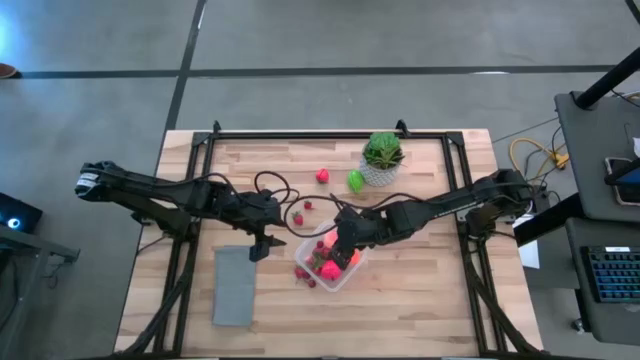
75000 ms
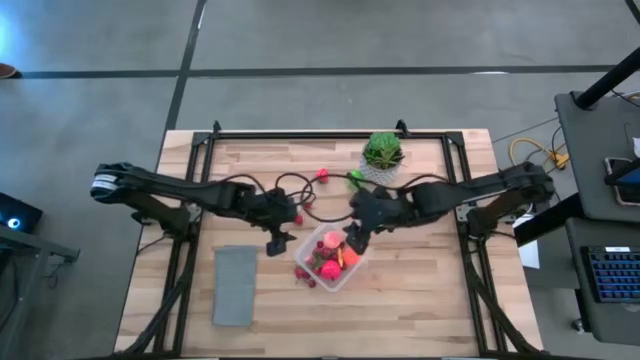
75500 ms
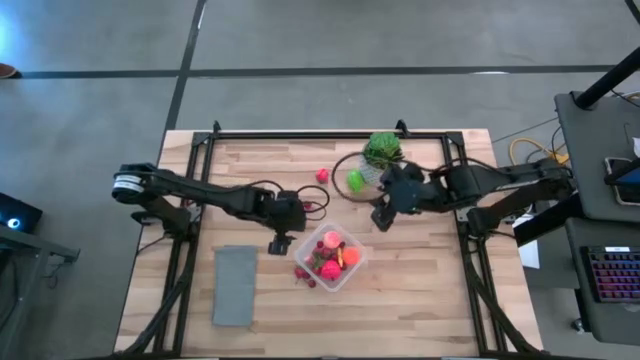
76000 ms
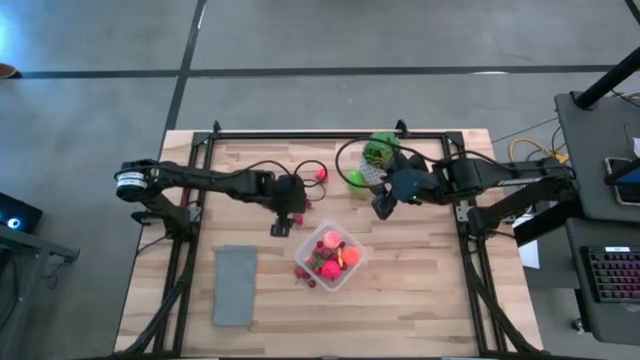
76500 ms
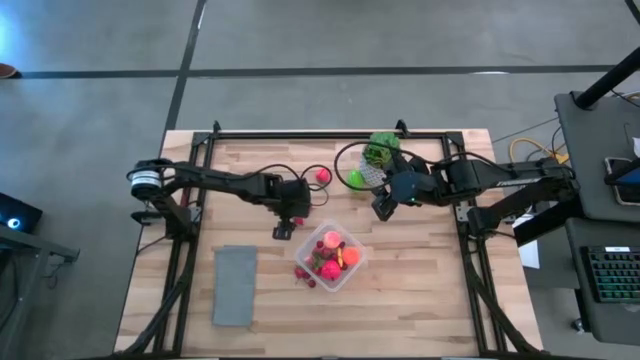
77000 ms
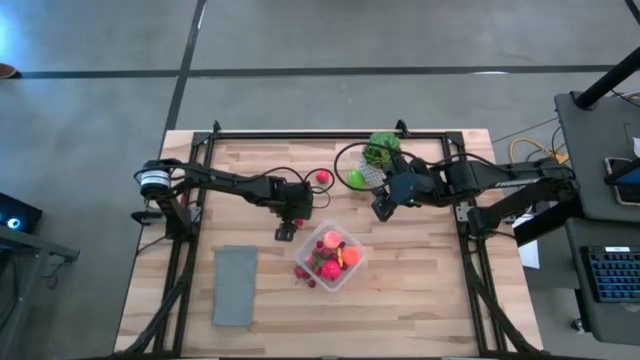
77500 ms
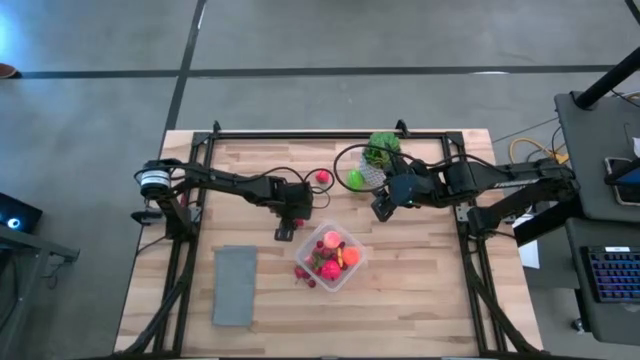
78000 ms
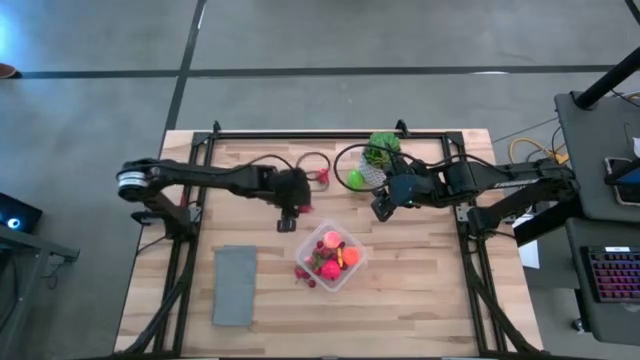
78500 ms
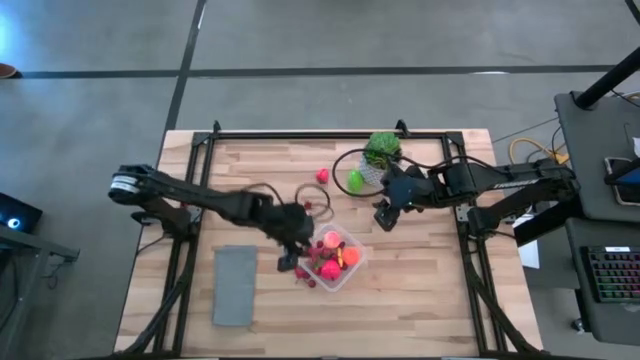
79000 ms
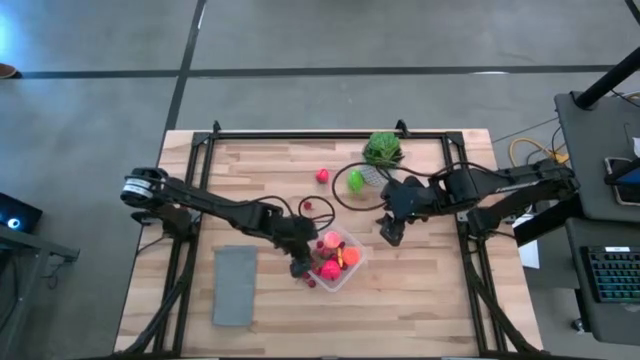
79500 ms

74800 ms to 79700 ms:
Task: Pick and placing Produce into tupperware
Put the red strawberry into the transparent bin

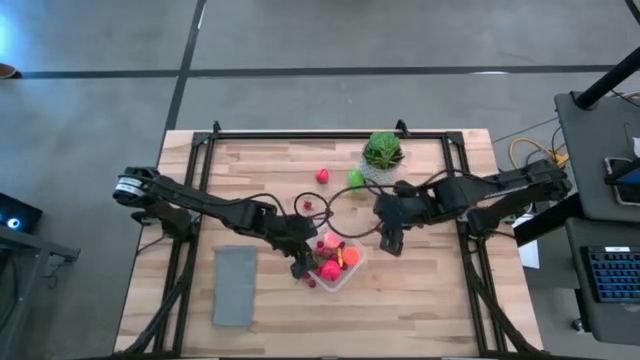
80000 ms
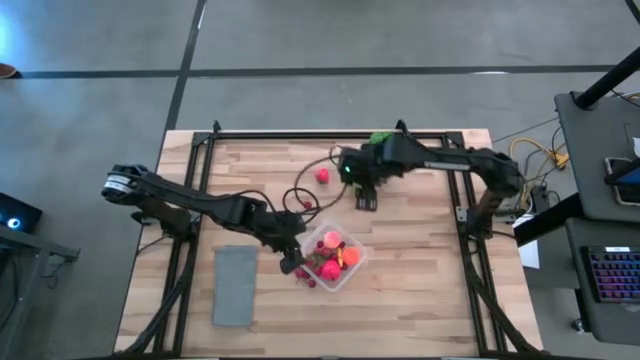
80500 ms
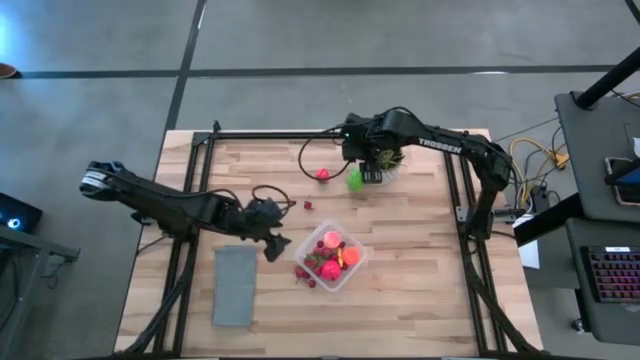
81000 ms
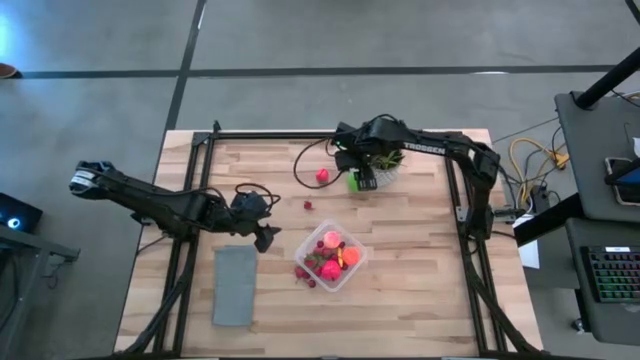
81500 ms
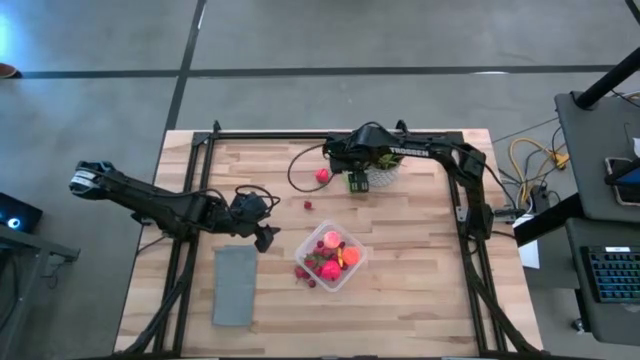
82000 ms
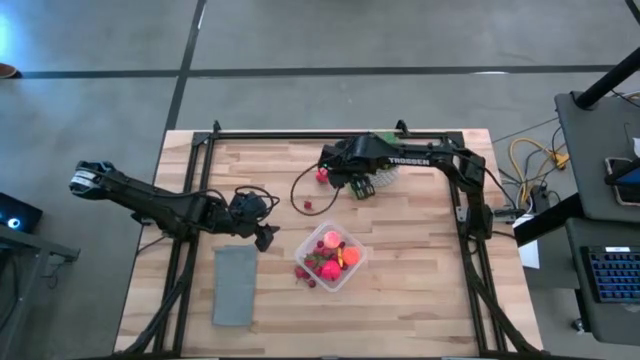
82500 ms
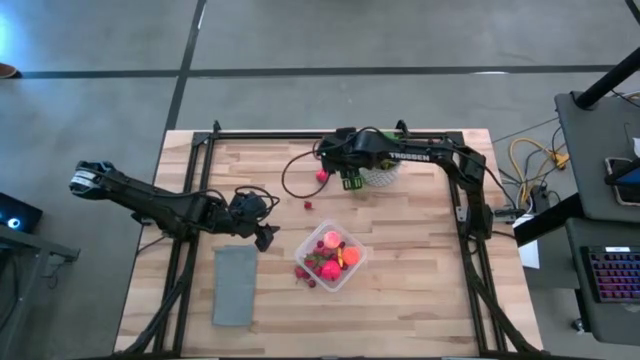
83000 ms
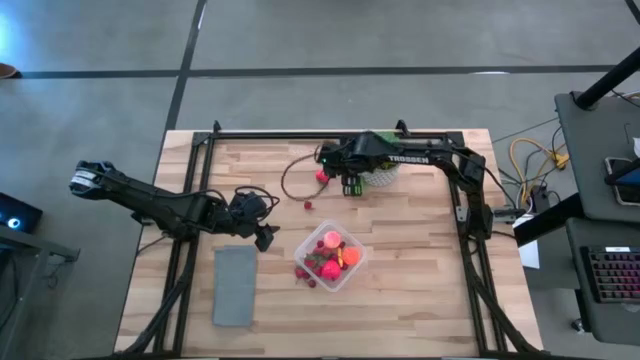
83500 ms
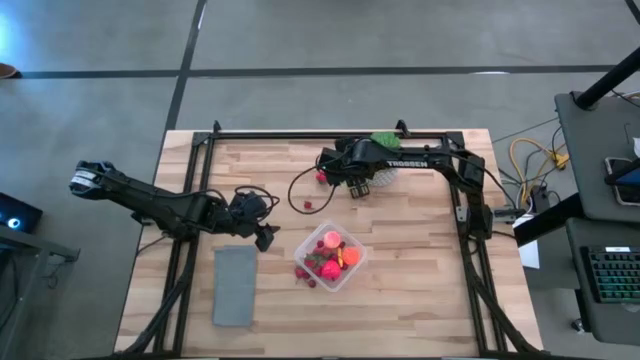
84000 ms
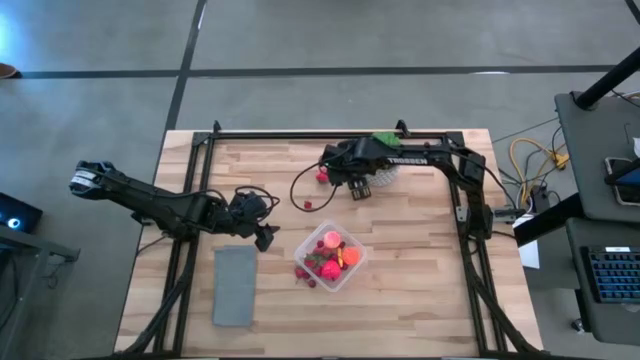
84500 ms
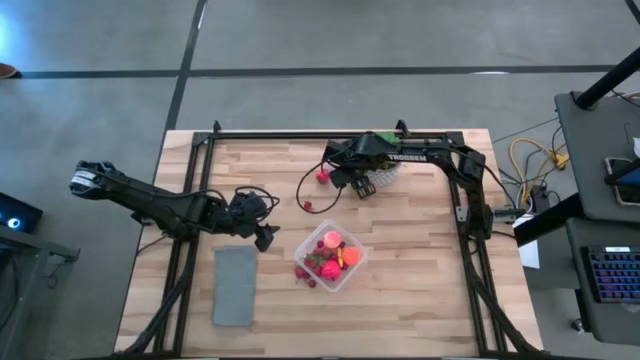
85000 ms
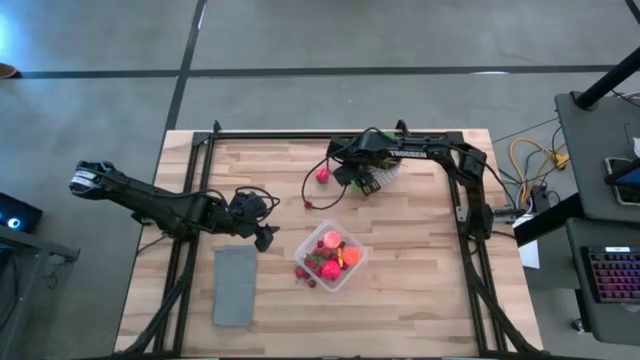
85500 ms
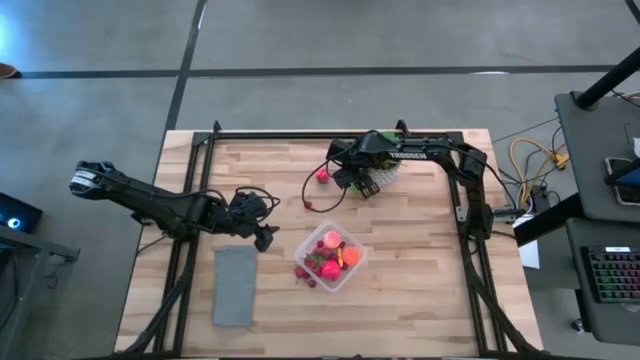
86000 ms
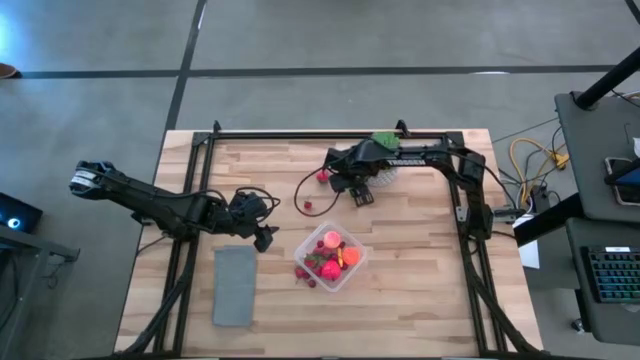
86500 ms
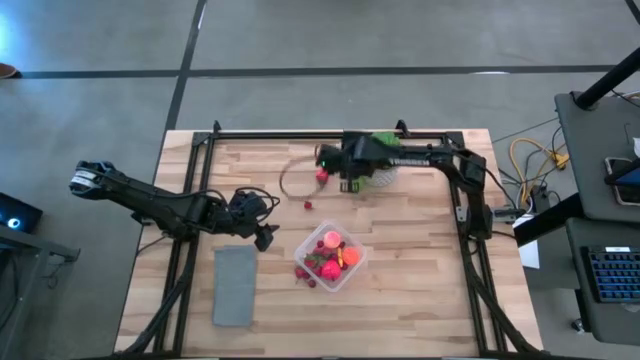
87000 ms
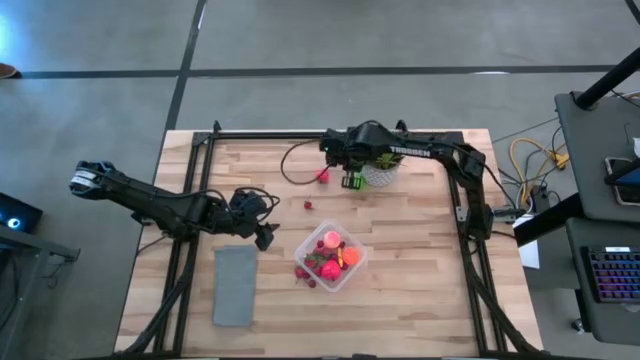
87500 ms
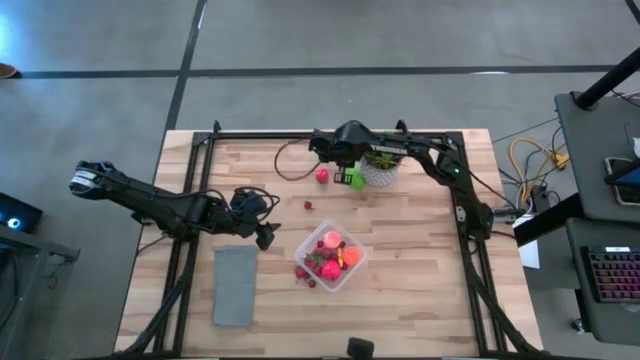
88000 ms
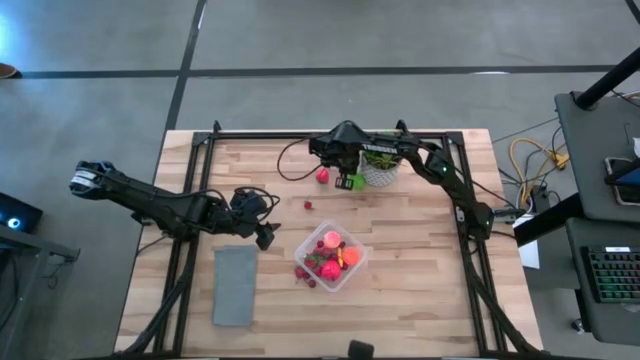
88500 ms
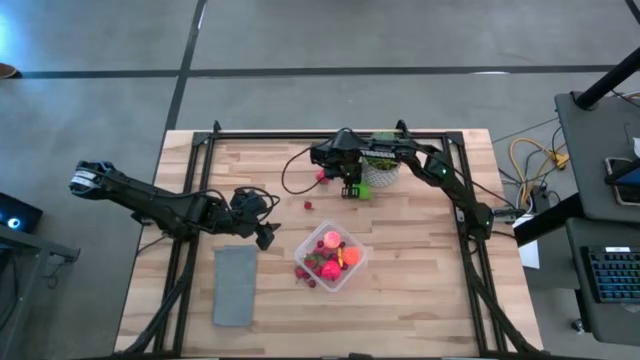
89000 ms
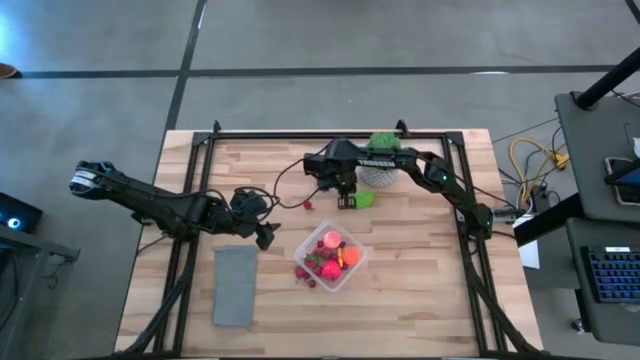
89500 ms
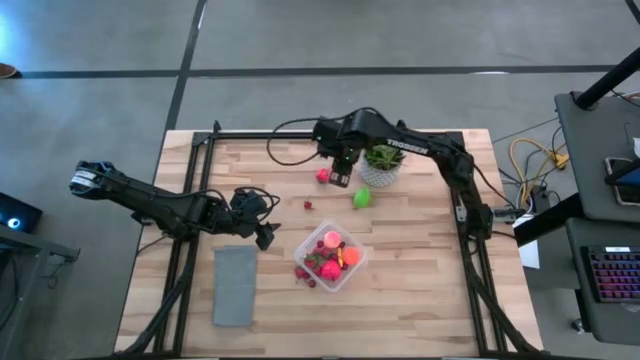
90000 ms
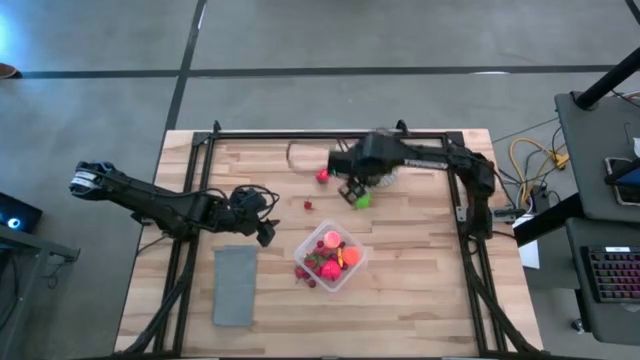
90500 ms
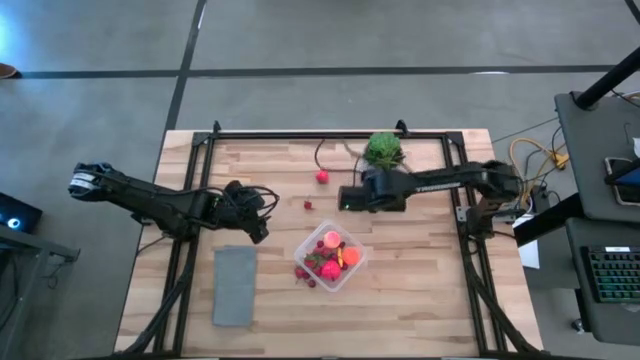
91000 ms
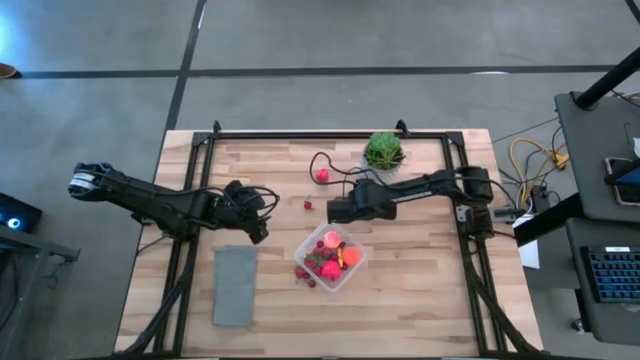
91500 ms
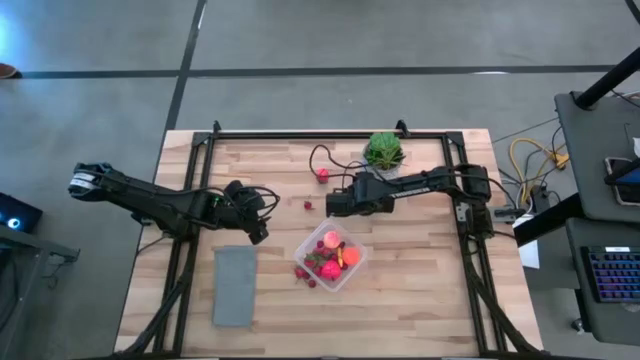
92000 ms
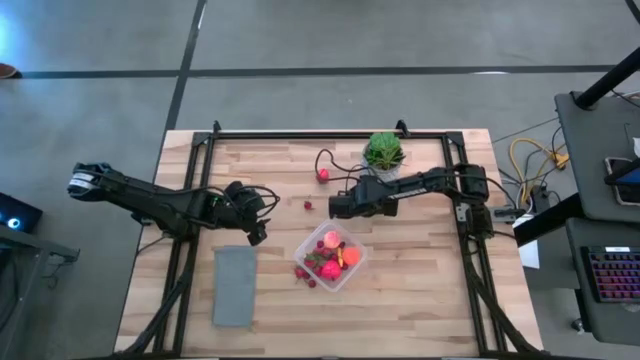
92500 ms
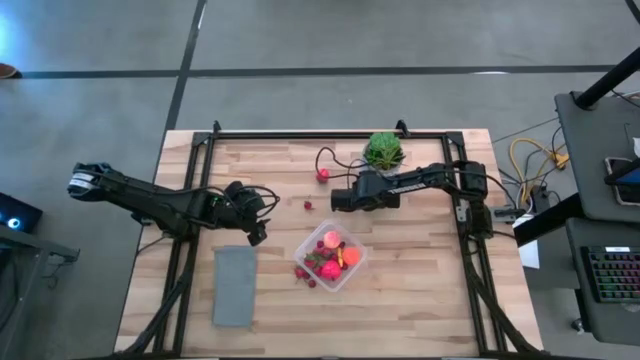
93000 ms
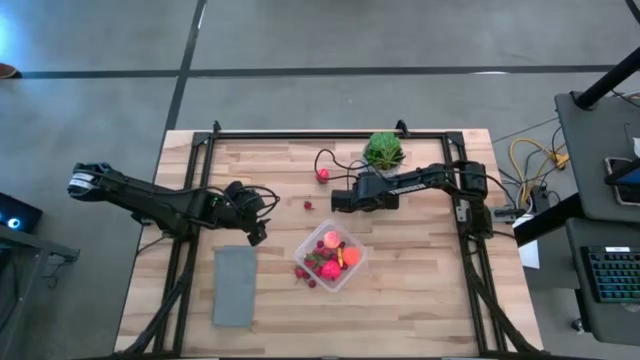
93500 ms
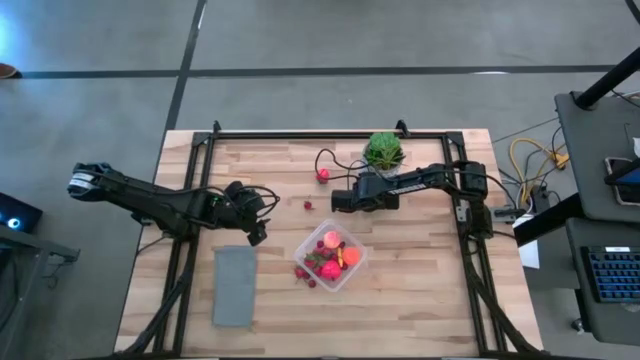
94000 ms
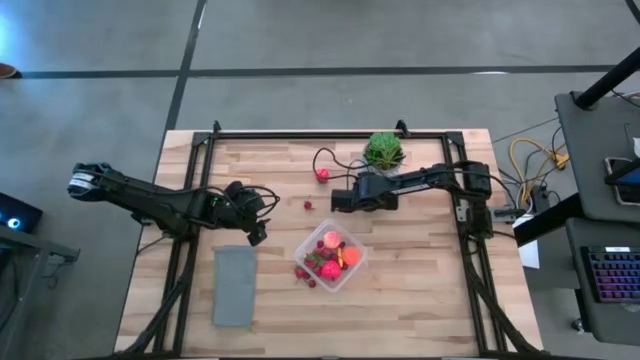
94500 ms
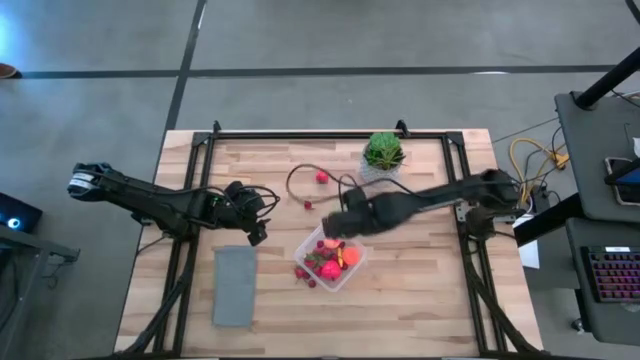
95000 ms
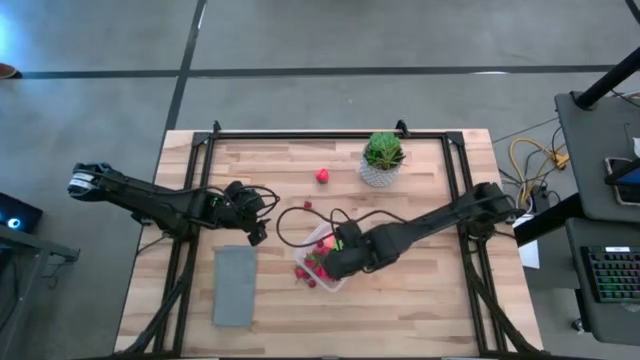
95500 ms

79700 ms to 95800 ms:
Put the green lime into the transparent bin

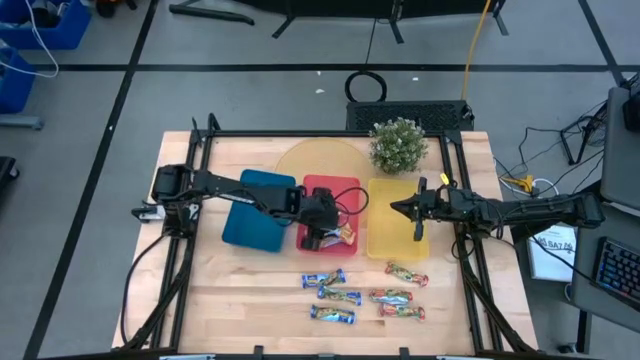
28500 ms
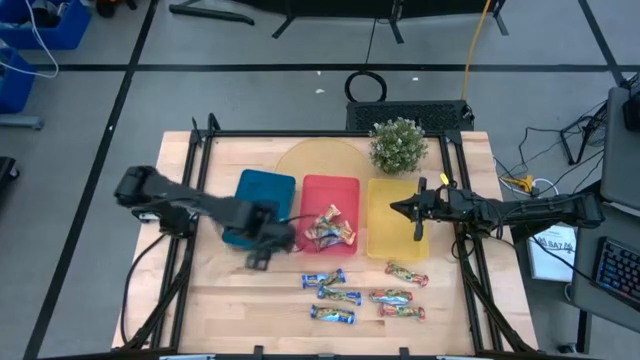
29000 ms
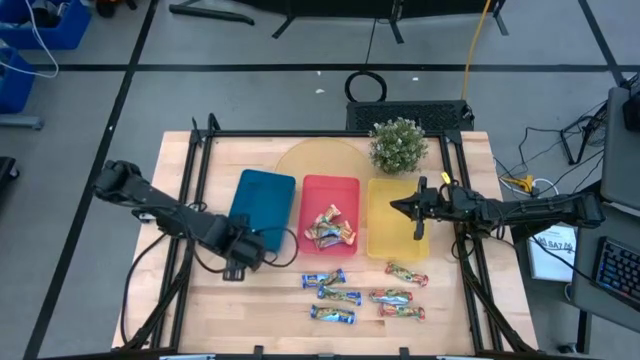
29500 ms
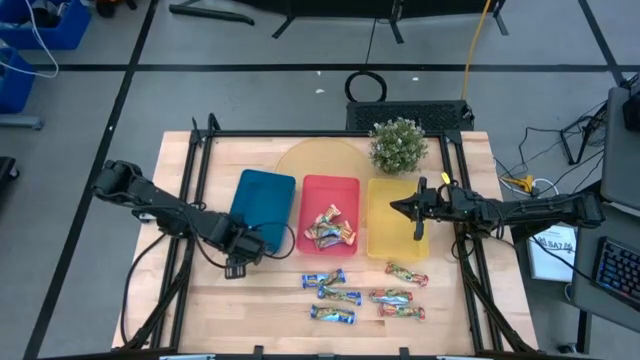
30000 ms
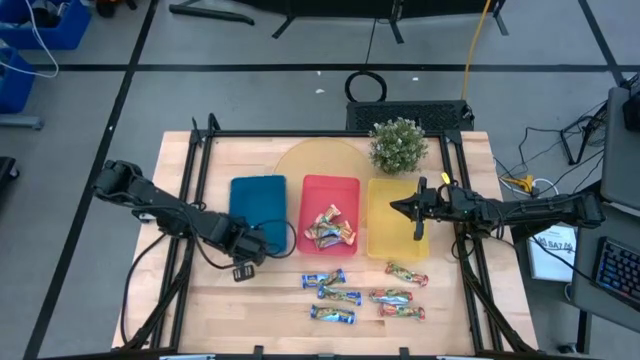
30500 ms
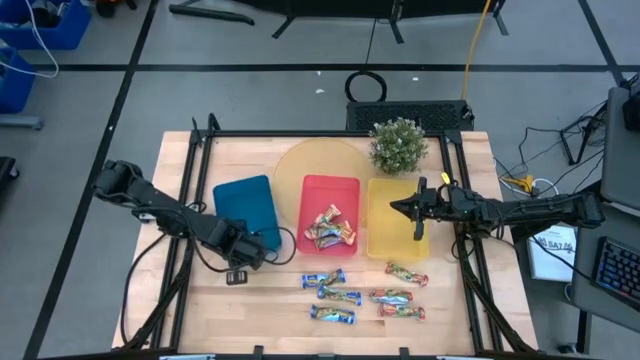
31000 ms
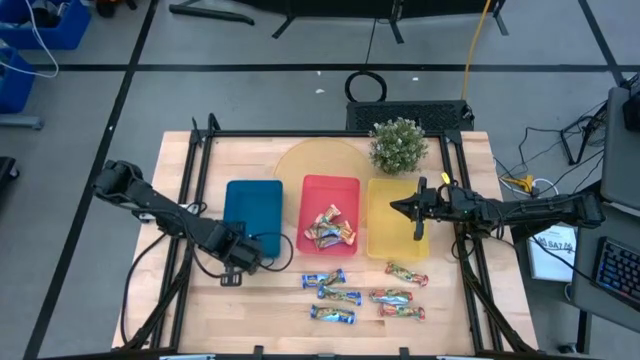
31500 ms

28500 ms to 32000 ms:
Task: Pick and place Granola Bars by type
Adjust the blue bin
